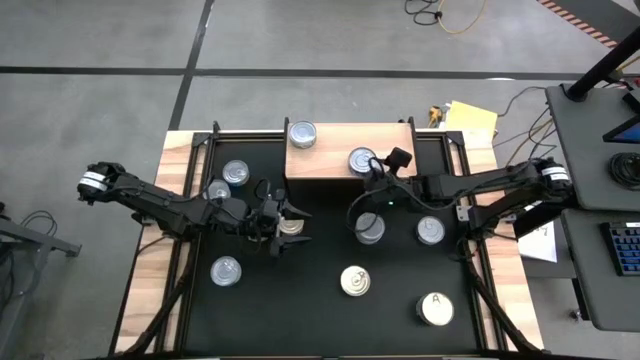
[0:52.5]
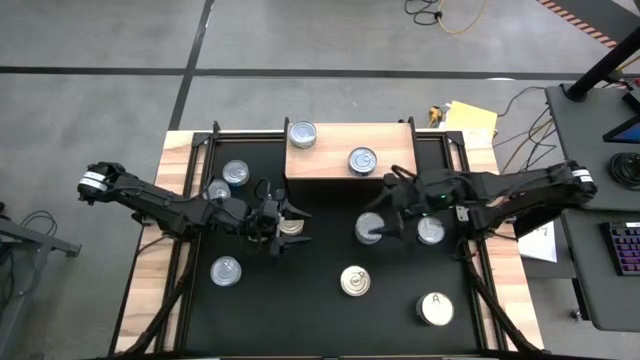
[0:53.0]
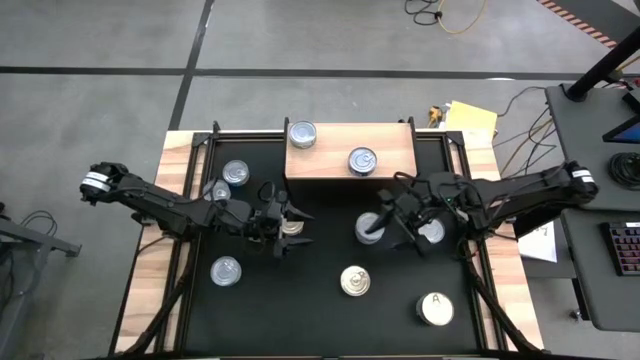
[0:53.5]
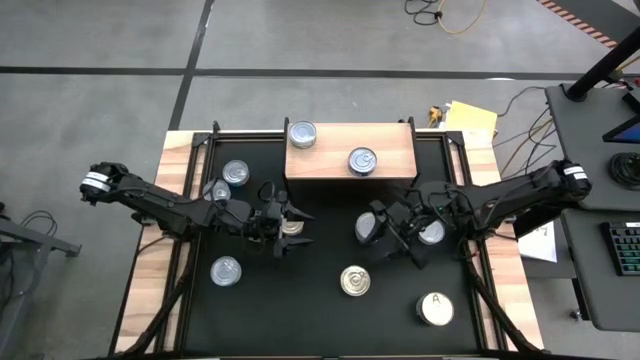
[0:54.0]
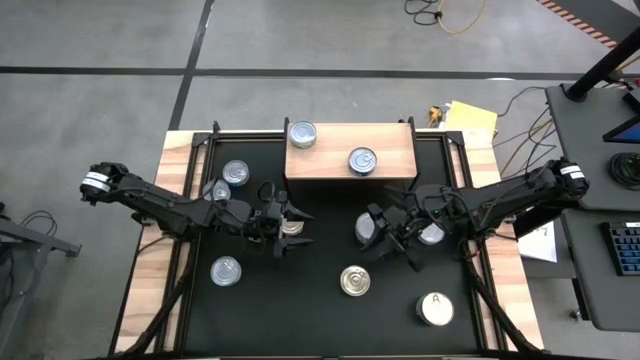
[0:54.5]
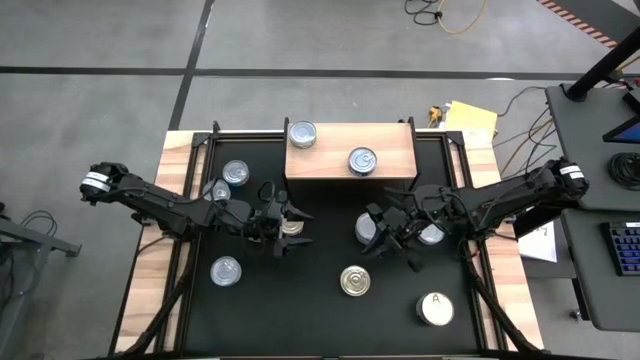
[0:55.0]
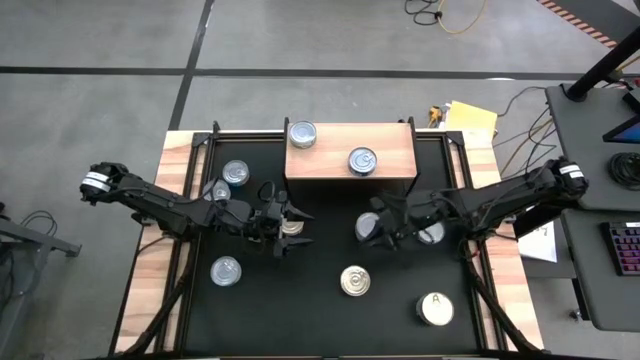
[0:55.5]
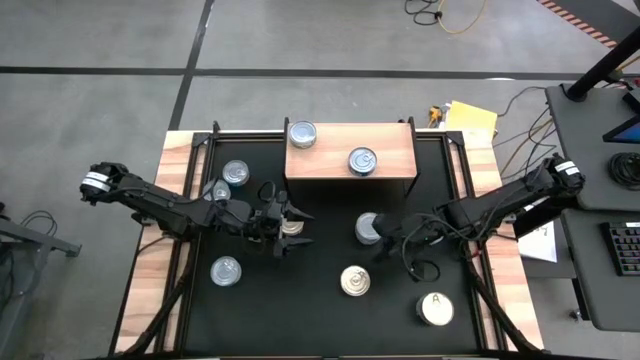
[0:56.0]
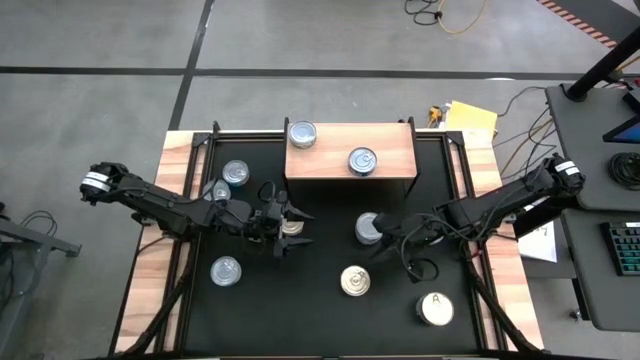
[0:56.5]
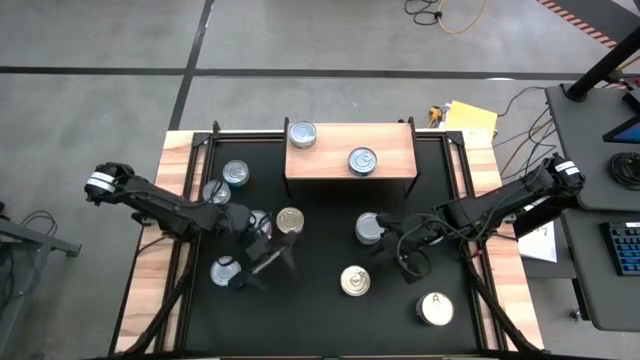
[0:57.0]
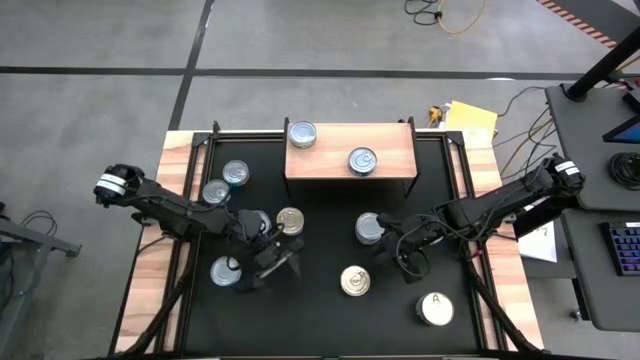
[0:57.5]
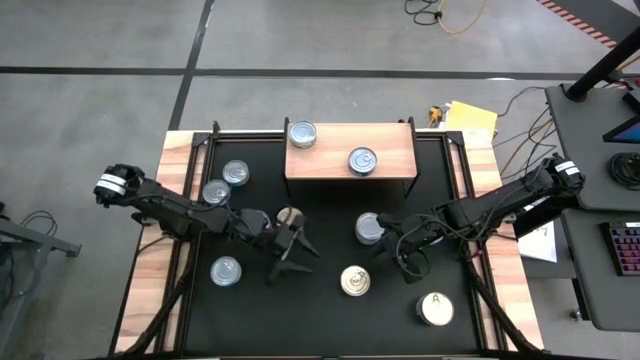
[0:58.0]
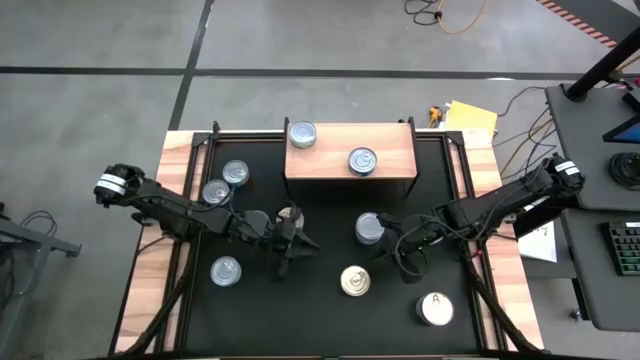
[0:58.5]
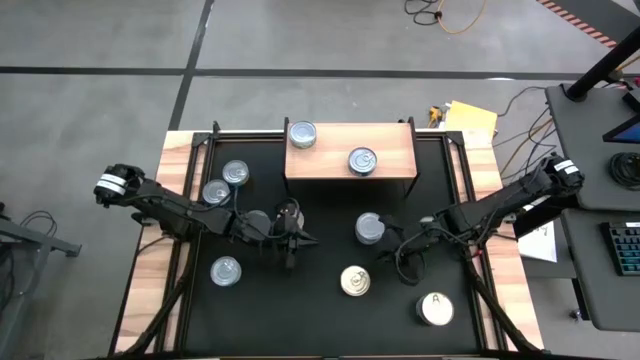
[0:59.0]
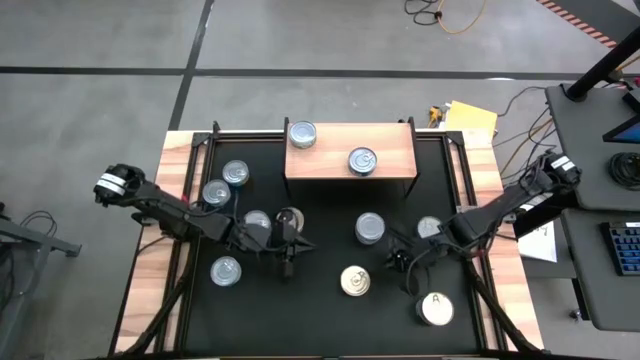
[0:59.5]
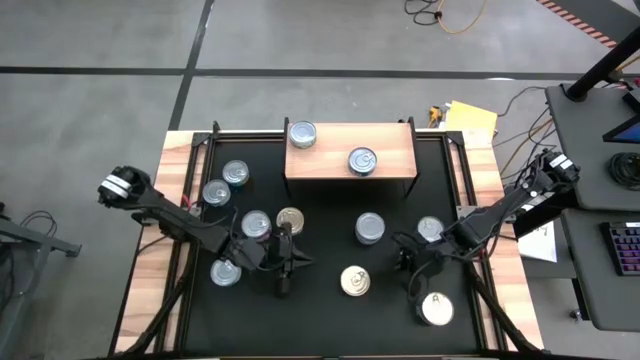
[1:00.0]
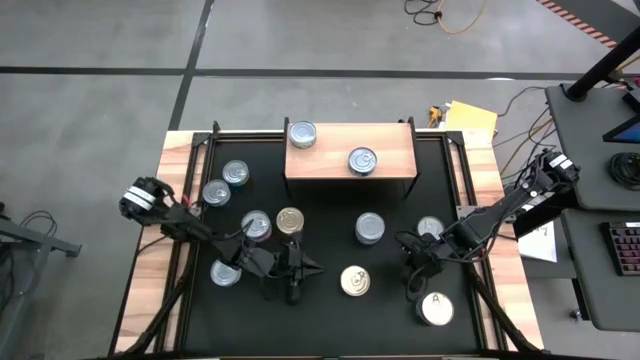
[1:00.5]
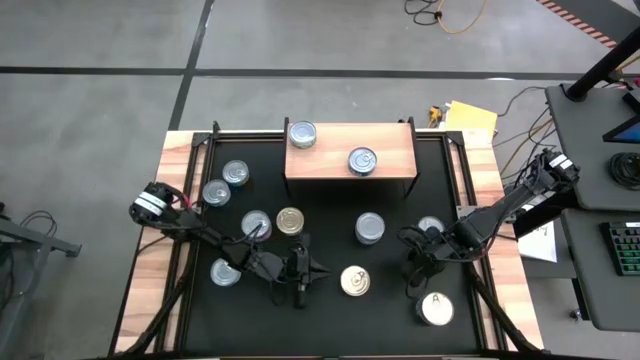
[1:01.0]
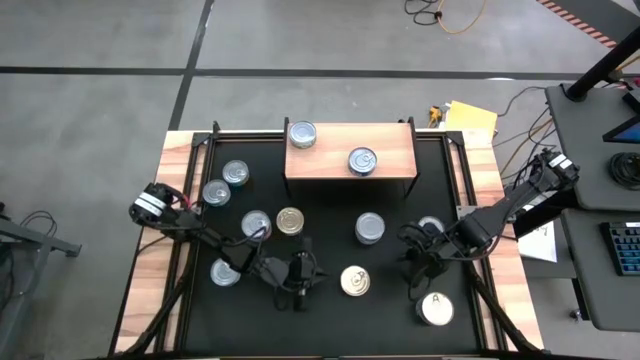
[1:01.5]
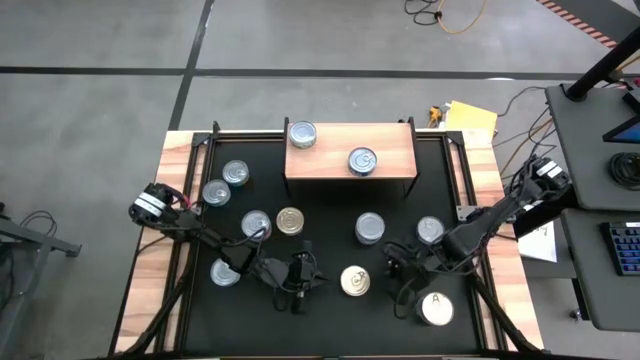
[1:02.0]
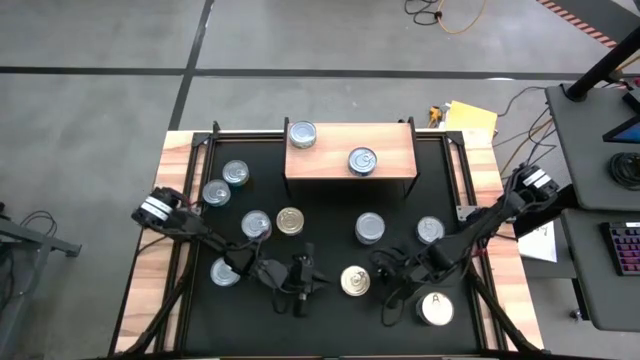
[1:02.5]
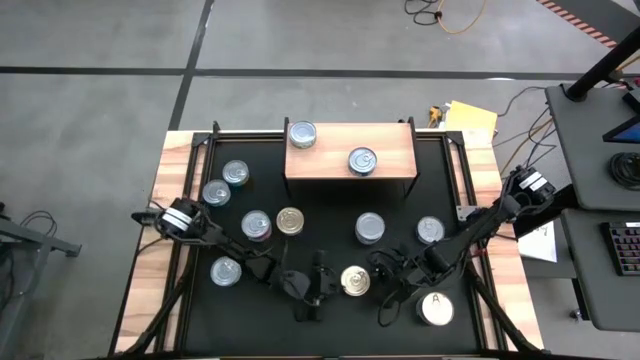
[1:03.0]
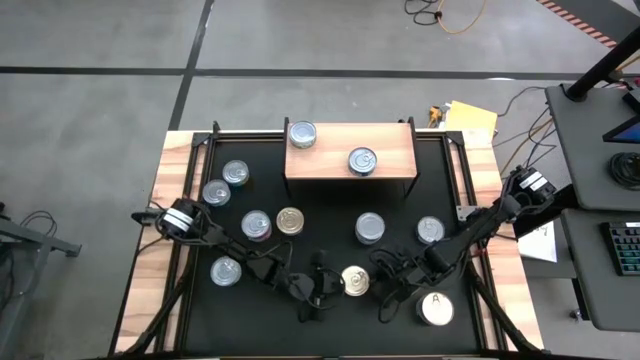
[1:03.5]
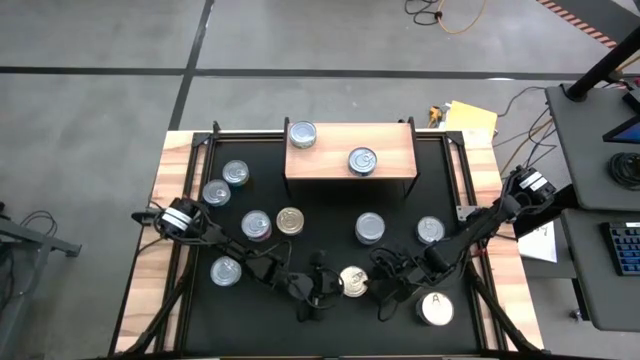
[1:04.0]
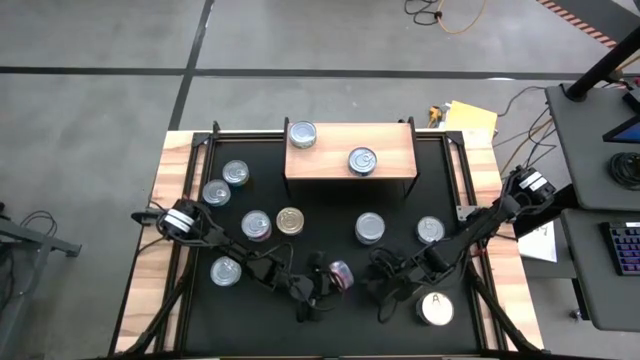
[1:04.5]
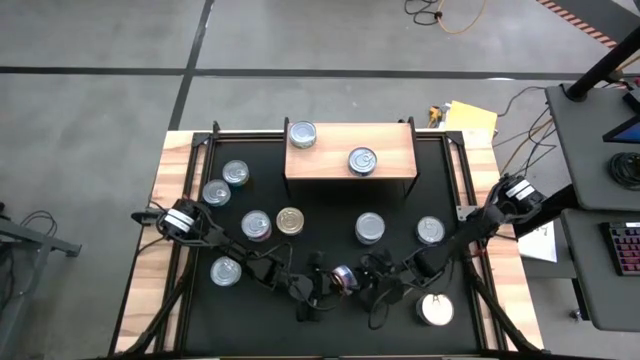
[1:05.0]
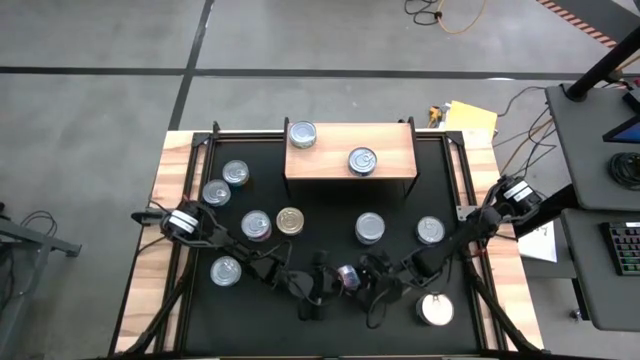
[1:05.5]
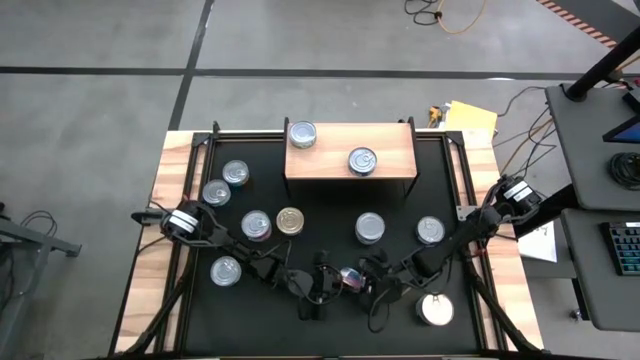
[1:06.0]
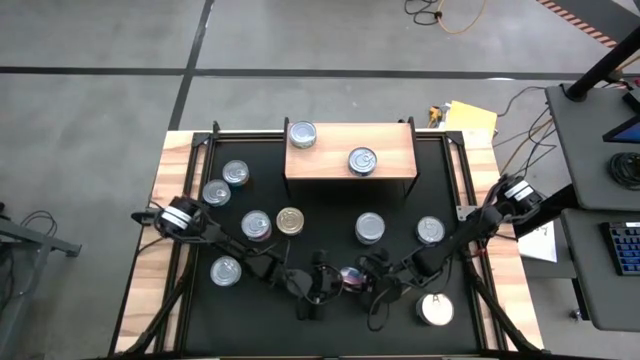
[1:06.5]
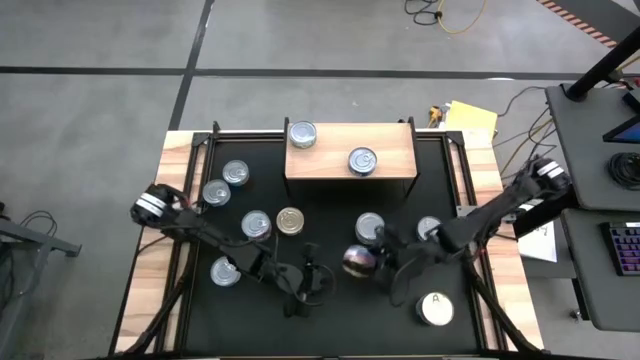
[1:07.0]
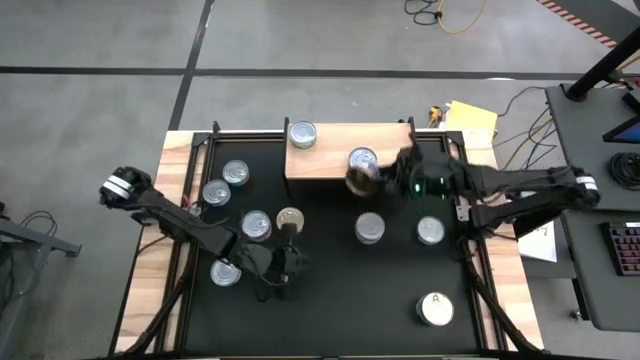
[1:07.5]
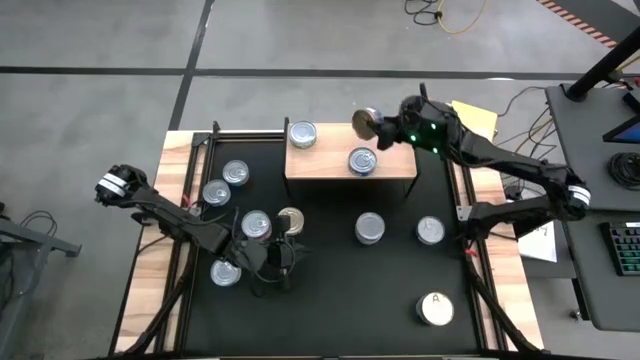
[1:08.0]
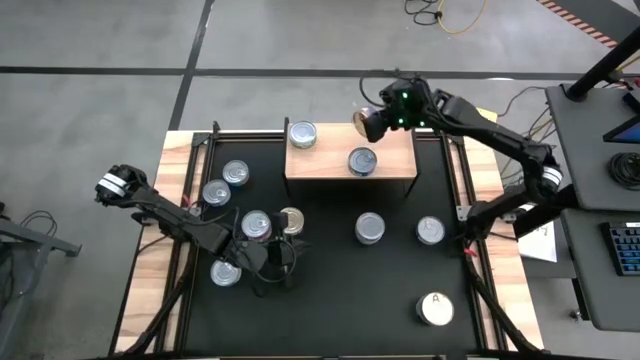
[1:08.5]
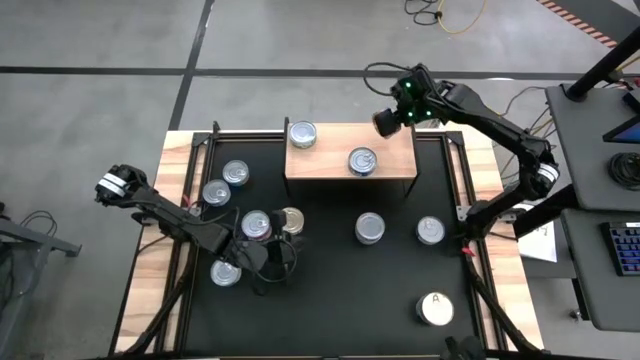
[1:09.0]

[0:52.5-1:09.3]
Task: Stack canned seafood by type on shelf
Put the blue pink tuna can on the shelf

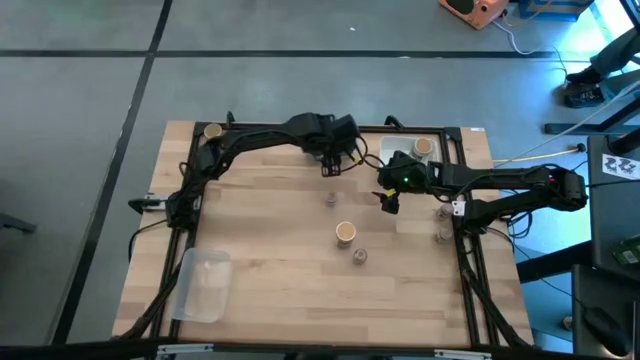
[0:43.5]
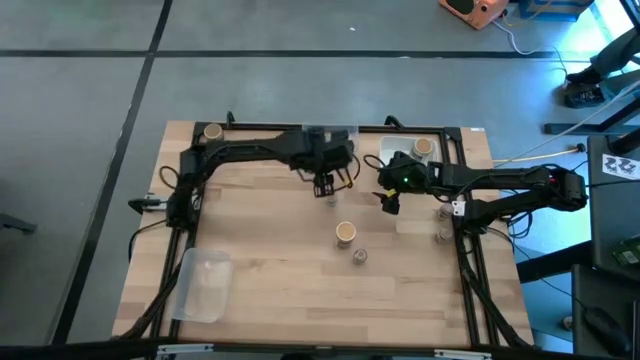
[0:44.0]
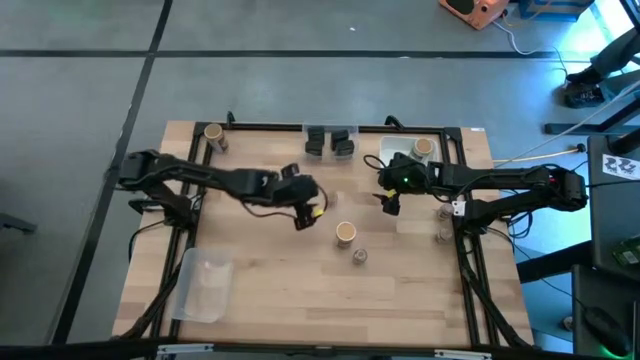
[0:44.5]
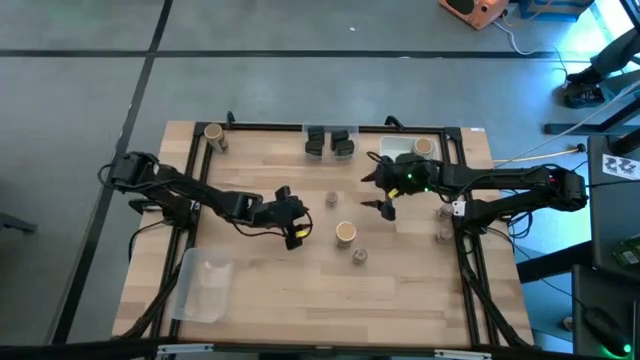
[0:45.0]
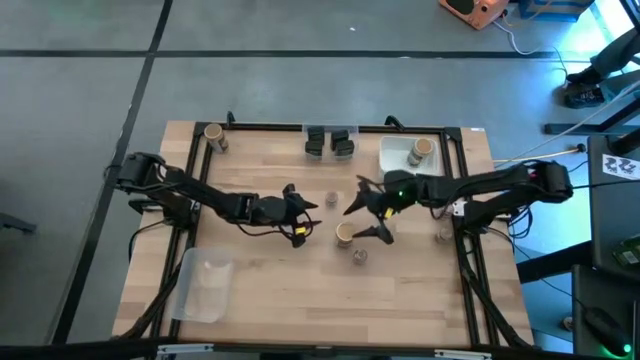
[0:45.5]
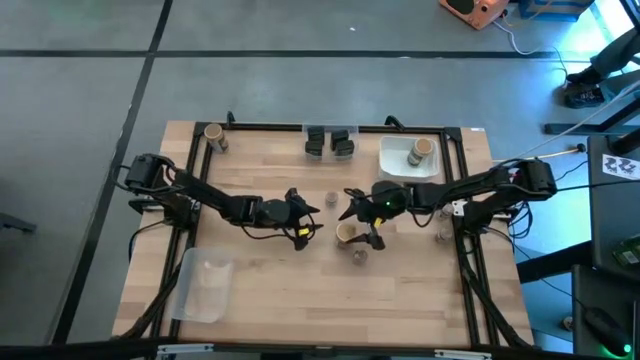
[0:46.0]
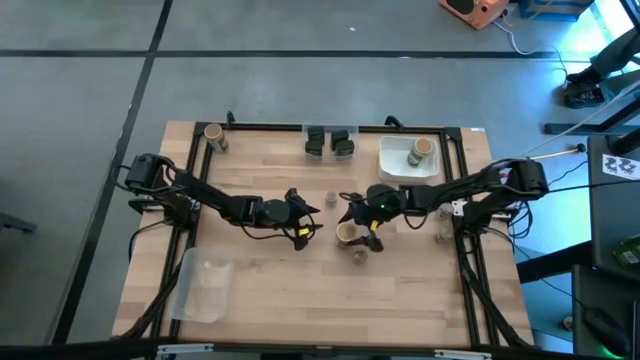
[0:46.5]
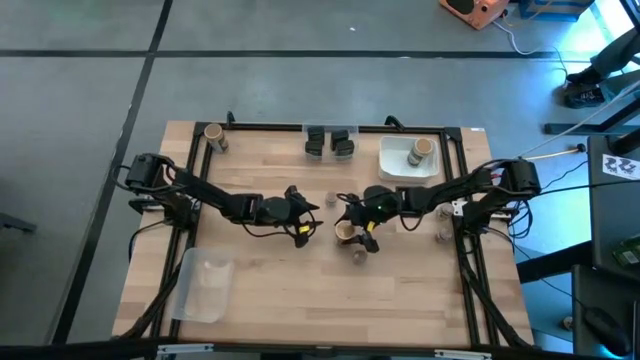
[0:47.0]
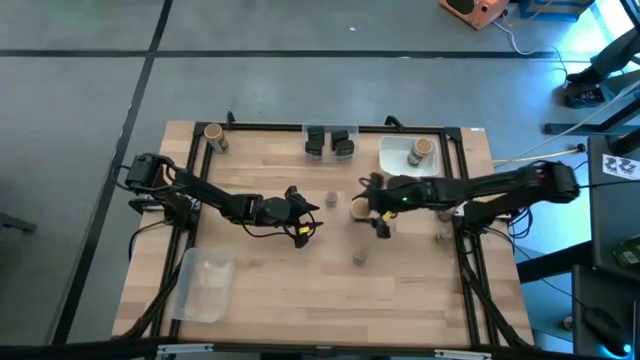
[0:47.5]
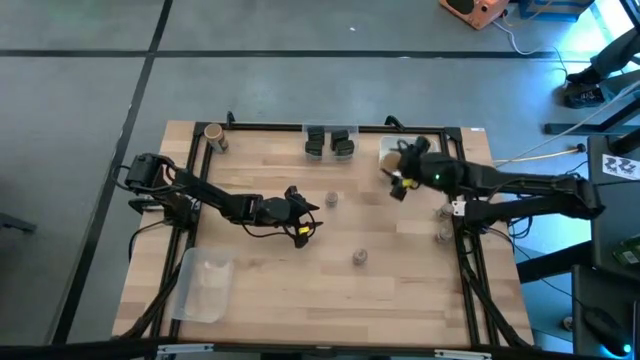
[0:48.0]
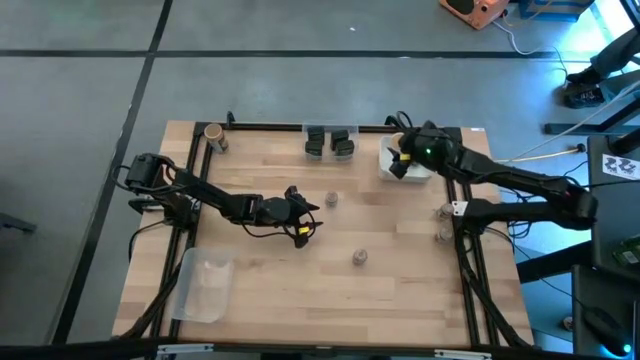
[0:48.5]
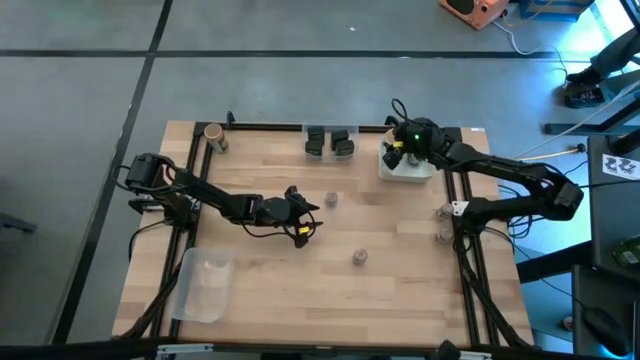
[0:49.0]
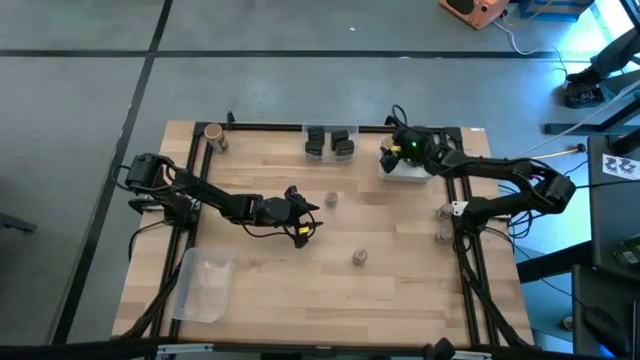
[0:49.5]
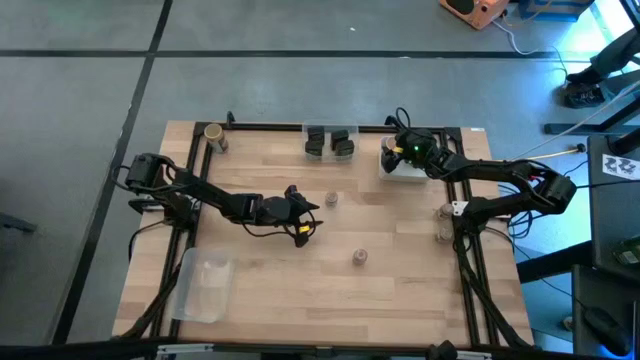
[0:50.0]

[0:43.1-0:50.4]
Task: Sort spices by type
Put the right brown seasoning bottle into the white bin
